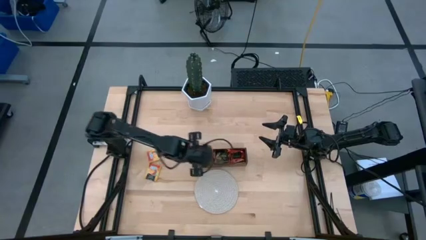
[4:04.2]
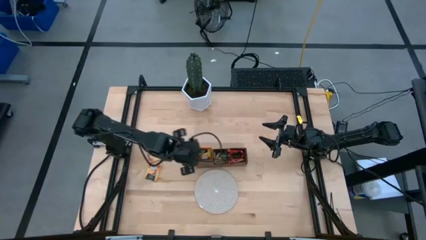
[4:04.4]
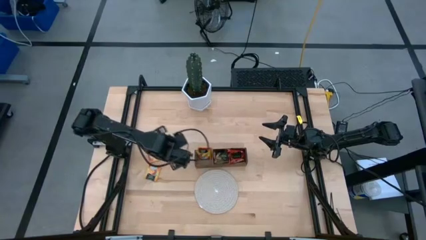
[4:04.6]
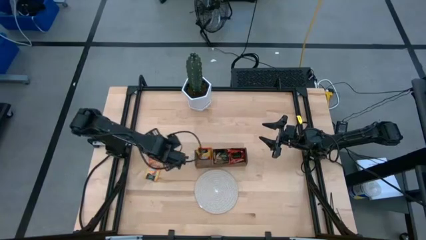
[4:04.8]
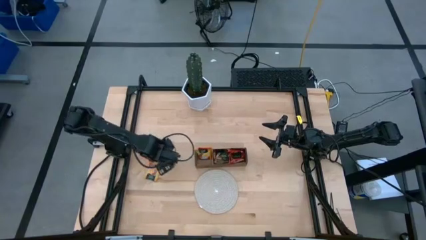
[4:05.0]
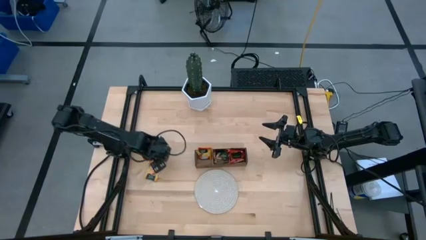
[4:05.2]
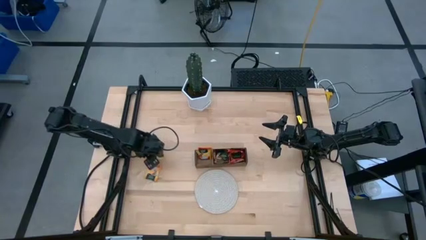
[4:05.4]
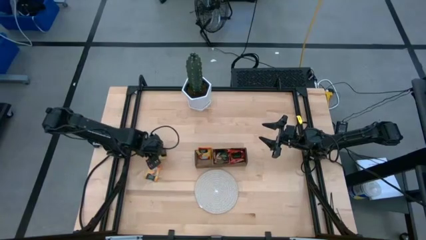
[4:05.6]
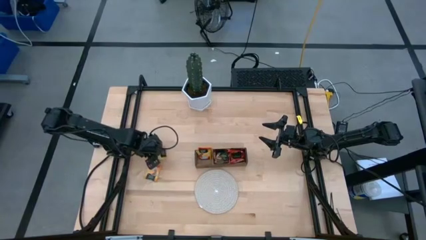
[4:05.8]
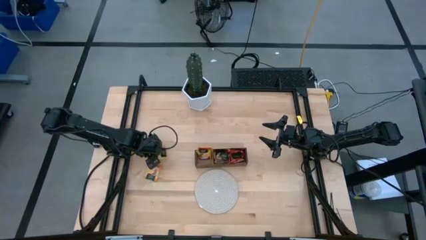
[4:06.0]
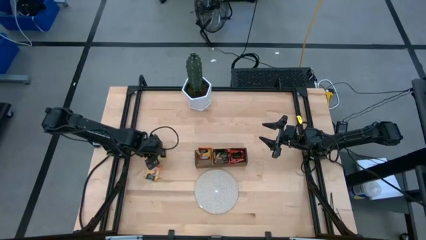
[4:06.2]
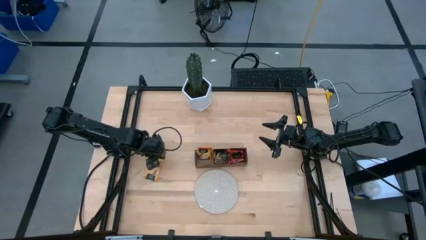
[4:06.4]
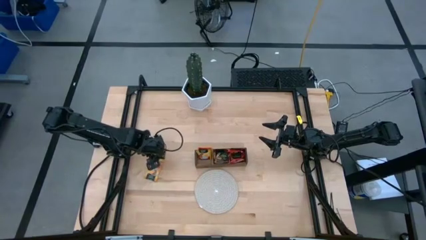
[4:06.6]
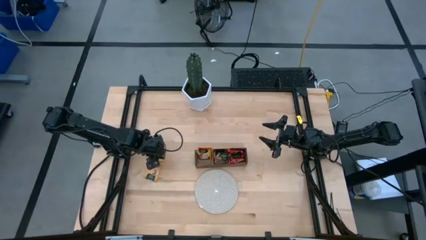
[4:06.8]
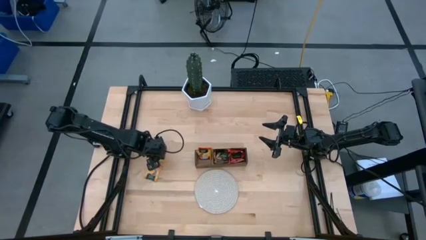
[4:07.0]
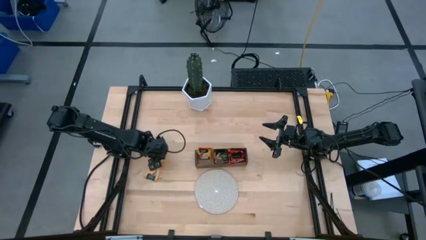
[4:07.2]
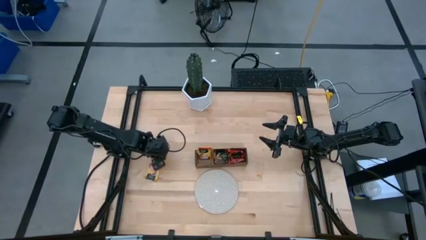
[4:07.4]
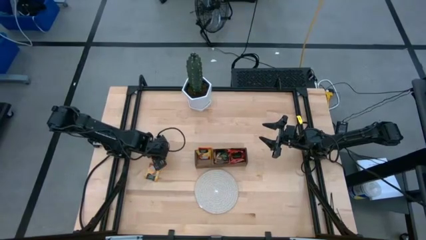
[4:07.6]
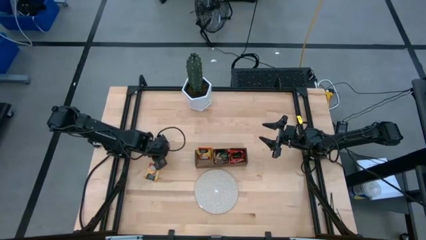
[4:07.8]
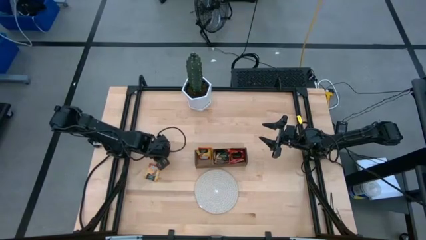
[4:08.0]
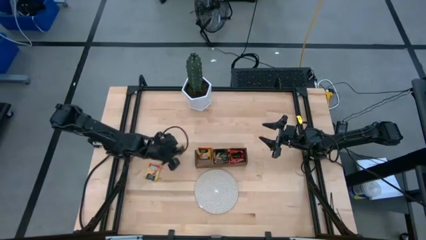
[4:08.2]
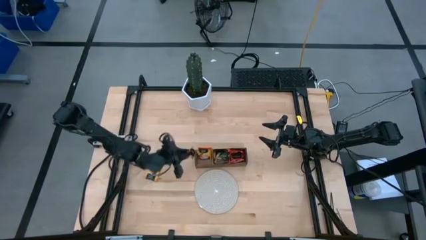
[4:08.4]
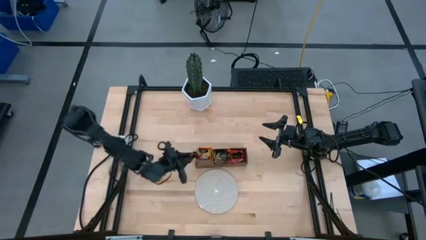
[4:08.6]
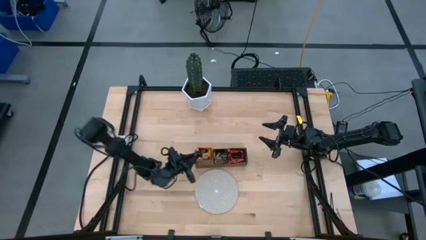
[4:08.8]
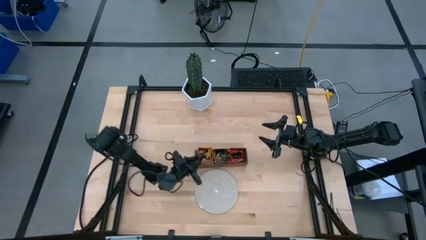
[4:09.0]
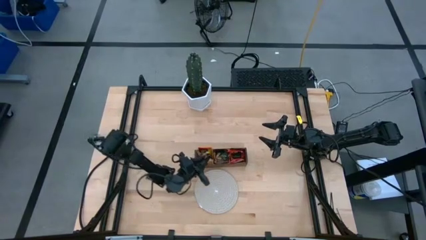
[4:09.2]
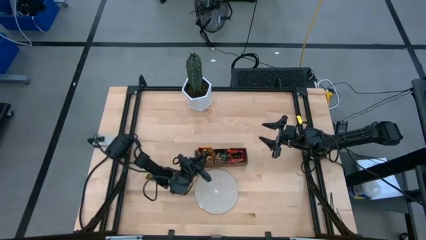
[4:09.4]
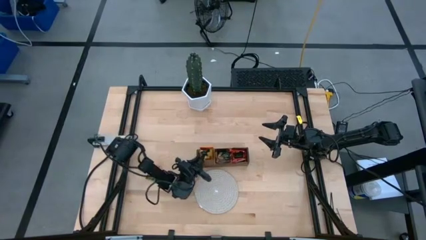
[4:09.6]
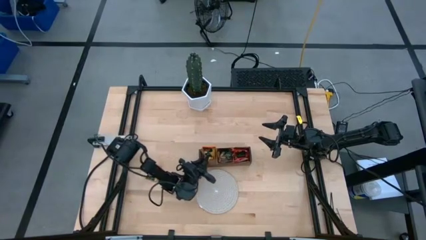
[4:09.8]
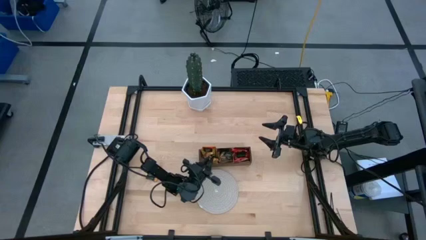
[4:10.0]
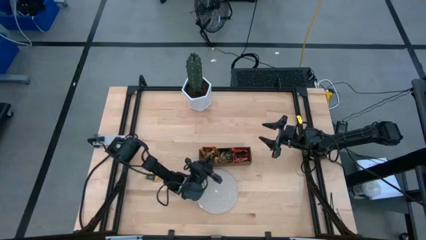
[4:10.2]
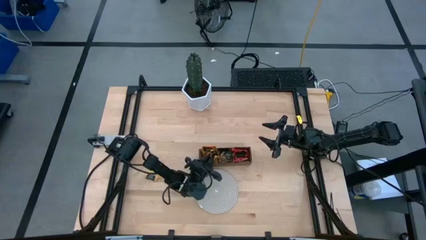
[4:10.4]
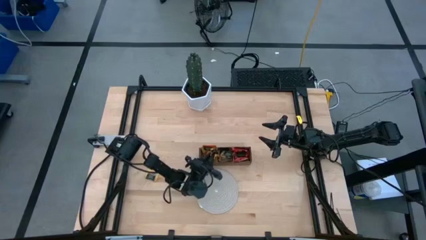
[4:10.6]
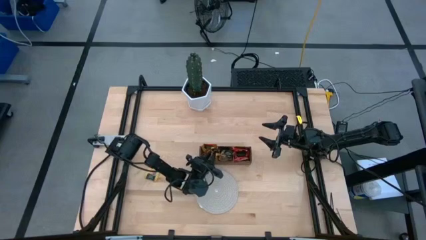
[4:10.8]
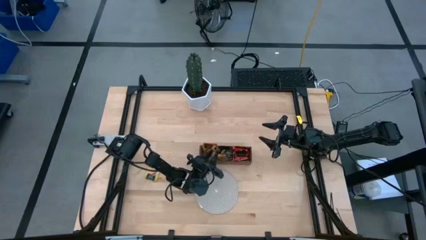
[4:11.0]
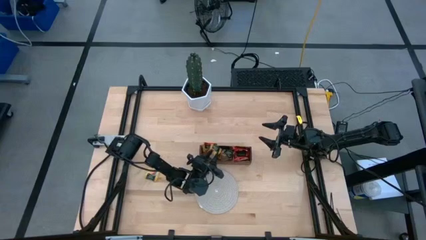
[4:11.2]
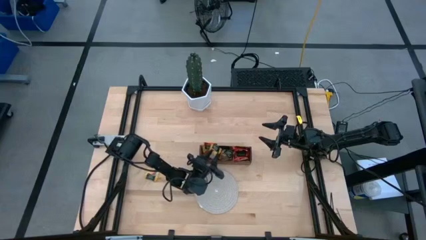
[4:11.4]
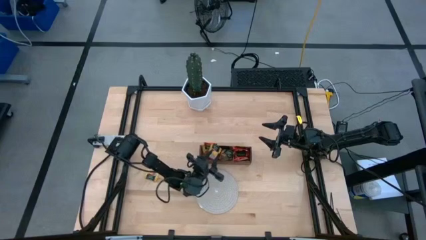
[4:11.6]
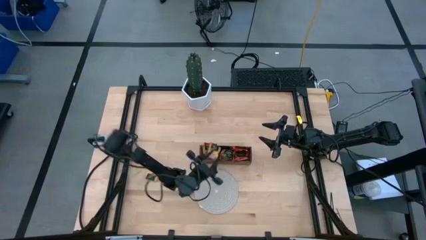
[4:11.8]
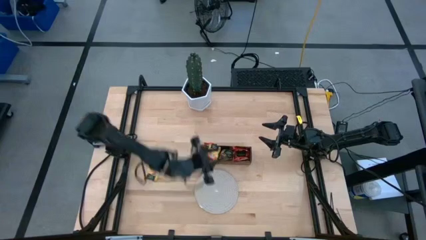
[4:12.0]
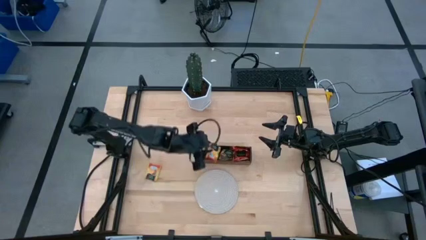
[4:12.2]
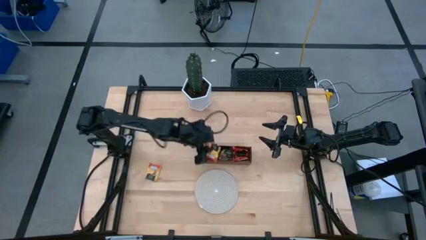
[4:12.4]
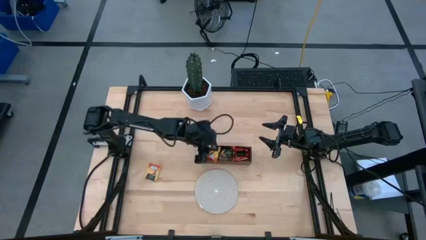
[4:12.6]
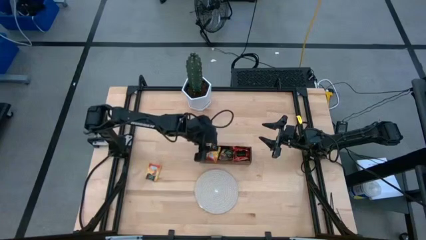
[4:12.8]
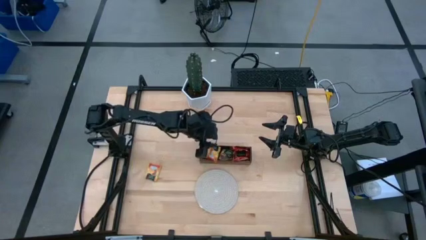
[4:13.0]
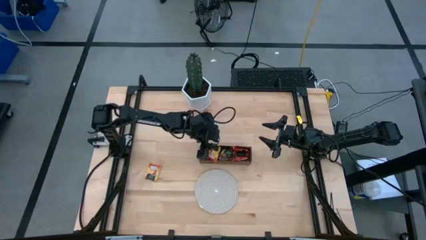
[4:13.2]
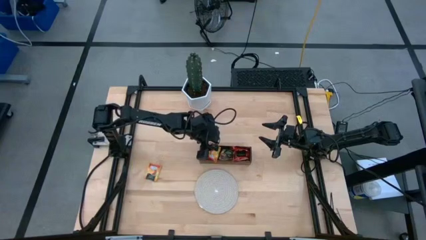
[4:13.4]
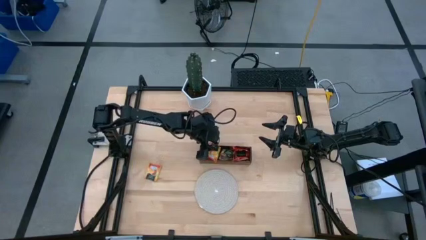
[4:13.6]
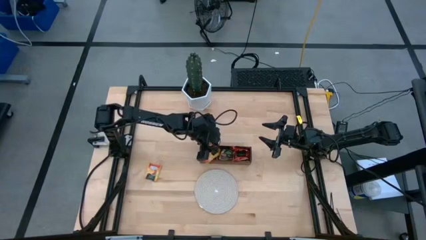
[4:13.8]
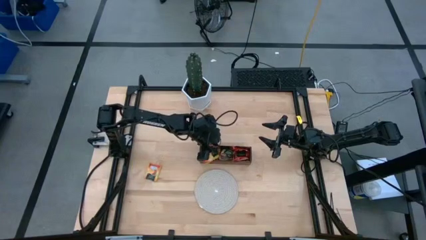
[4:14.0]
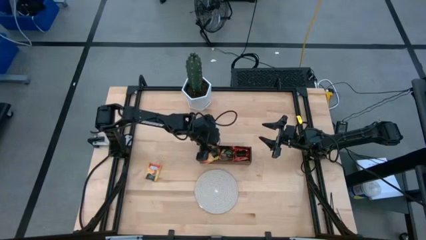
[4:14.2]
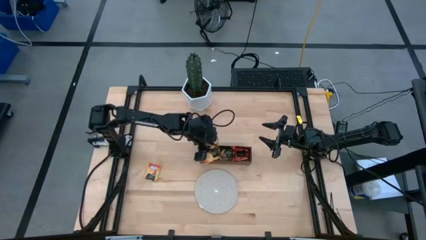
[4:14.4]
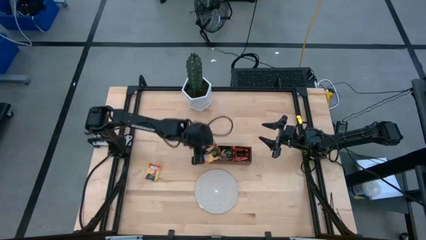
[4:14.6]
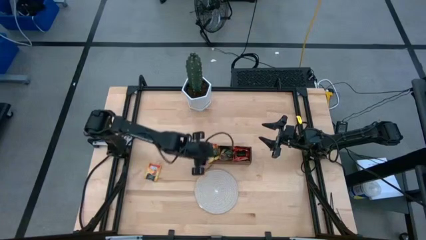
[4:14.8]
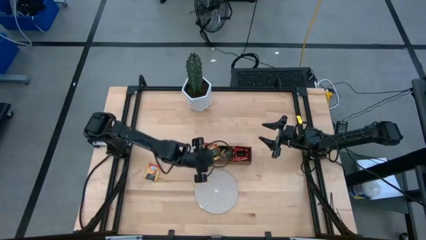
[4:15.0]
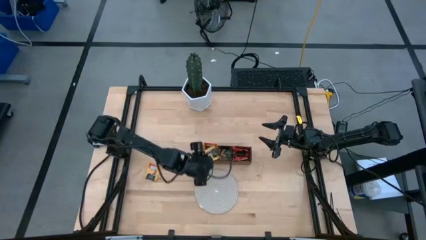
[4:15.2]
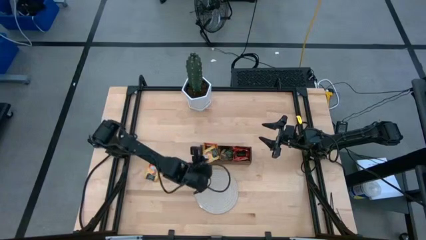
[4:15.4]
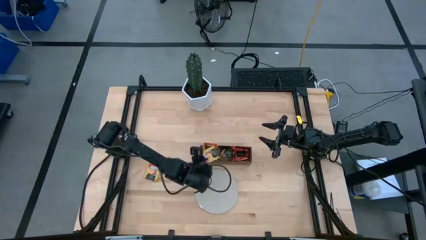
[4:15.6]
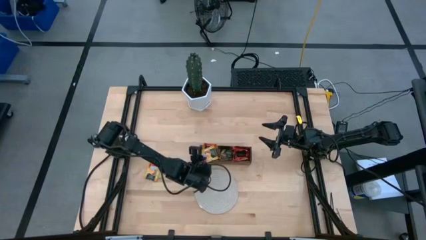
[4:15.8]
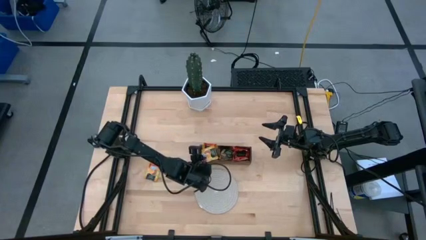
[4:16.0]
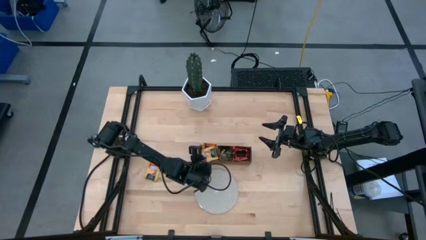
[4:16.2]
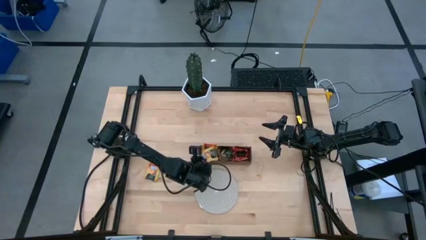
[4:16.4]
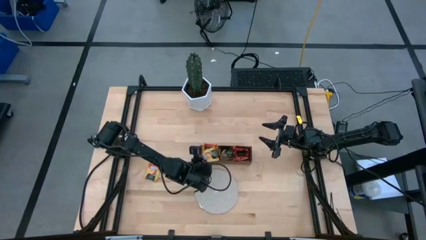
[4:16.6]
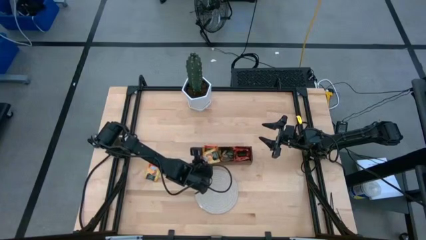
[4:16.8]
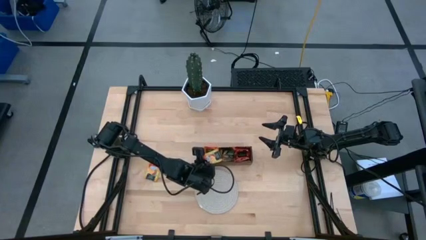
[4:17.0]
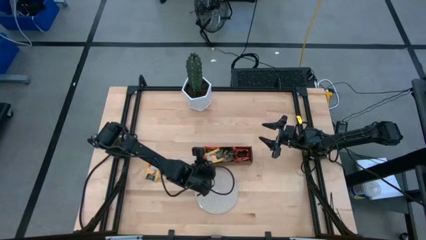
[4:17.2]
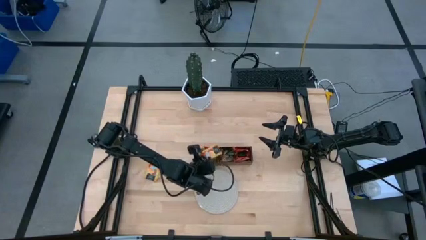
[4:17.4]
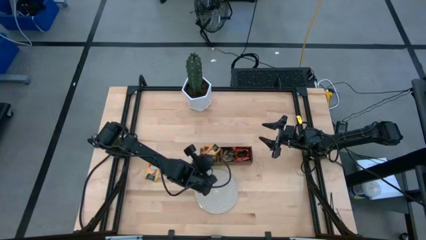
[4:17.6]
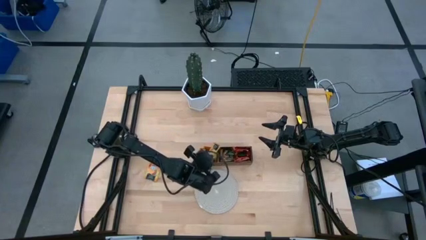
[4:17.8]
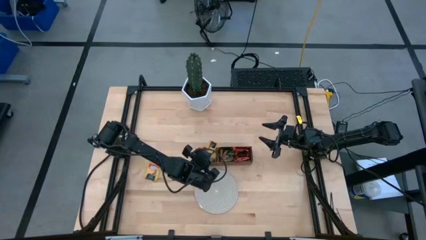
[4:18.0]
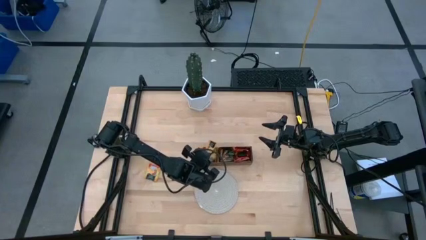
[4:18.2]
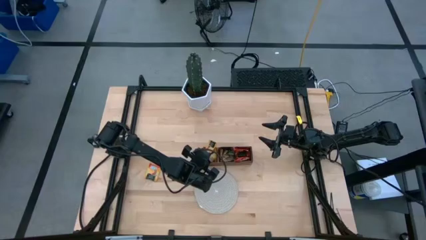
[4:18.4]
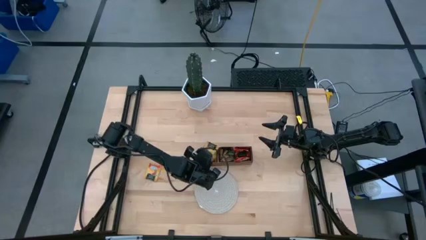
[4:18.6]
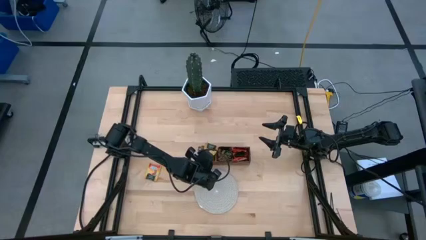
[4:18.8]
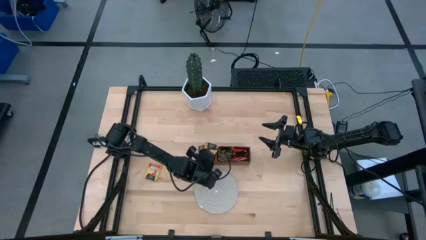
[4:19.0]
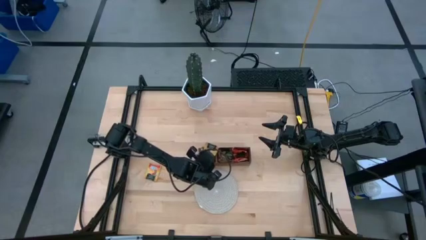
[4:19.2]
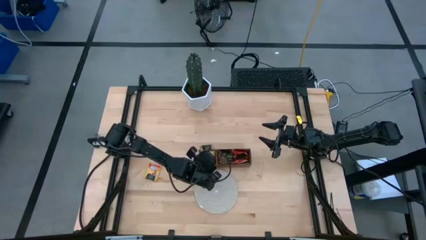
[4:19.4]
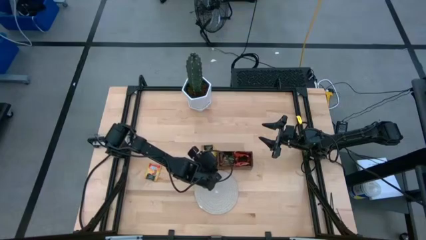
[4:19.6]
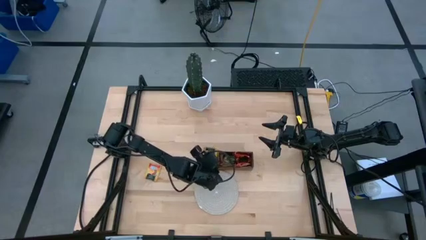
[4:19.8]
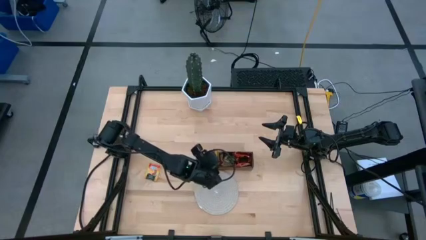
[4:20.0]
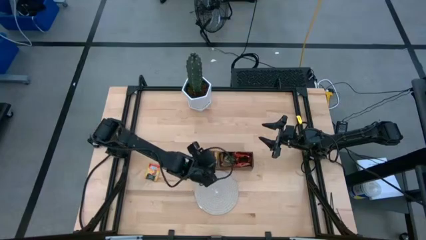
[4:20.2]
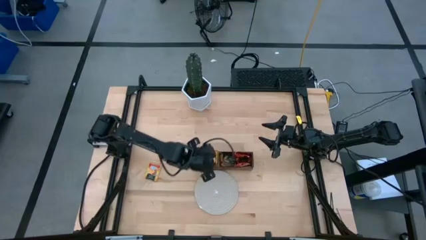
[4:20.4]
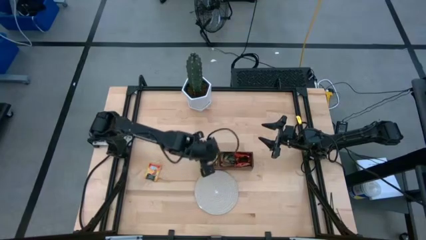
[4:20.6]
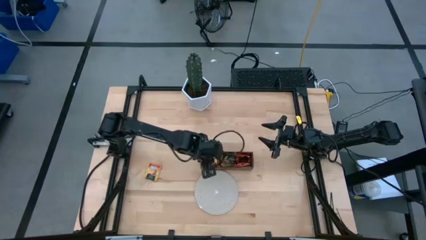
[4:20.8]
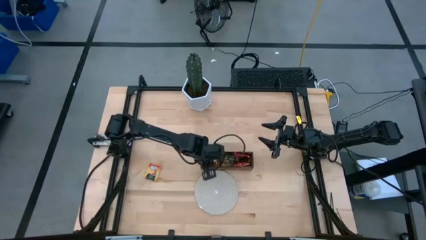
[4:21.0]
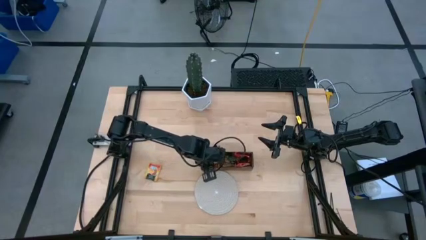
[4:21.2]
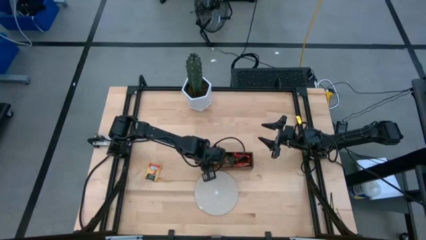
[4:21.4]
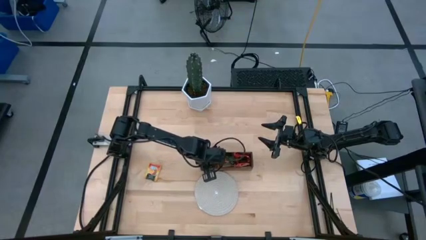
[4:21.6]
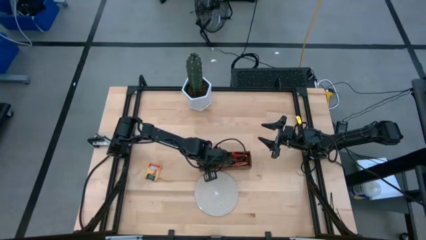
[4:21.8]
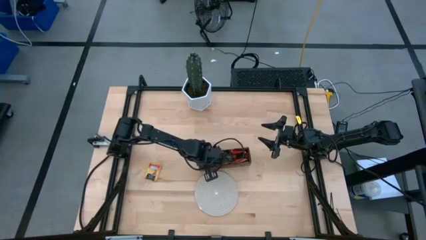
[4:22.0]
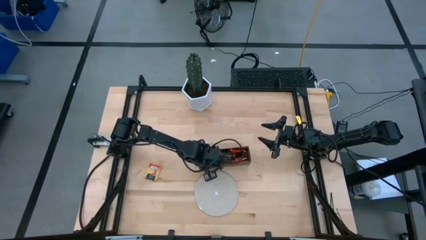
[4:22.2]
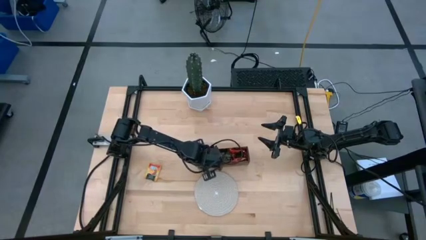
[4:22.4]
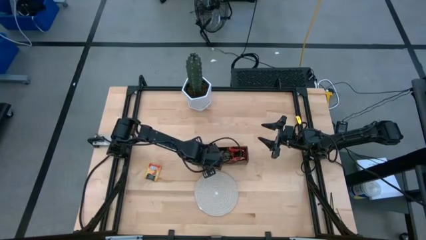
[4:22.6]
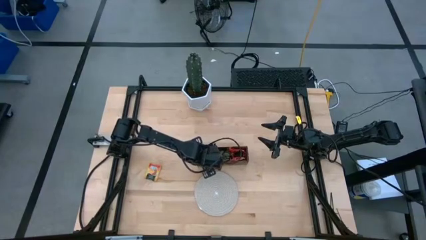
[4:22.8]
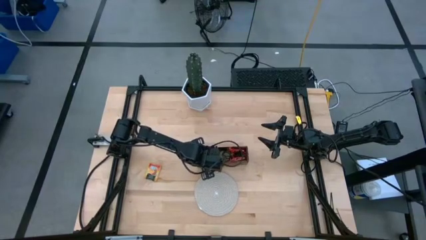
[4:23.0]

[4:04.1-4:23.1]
Task: Pick & Place Tea
Put the yellow tea bag into the left section of the wooden organizer
